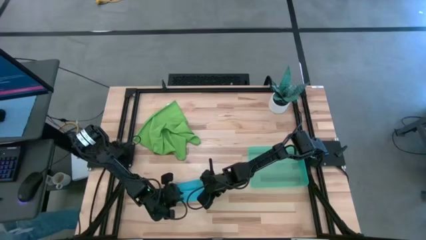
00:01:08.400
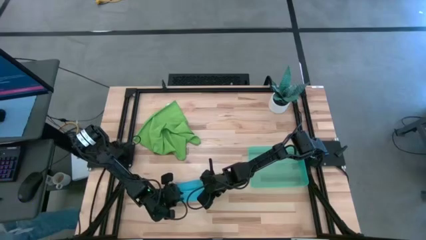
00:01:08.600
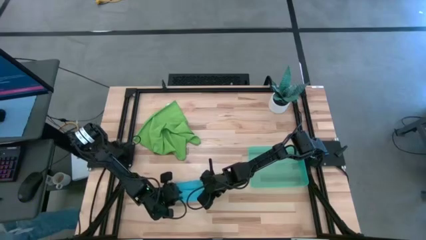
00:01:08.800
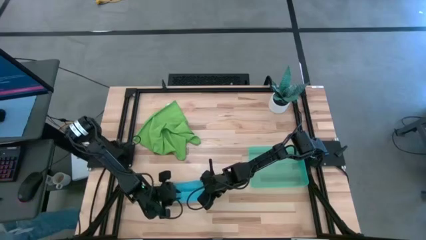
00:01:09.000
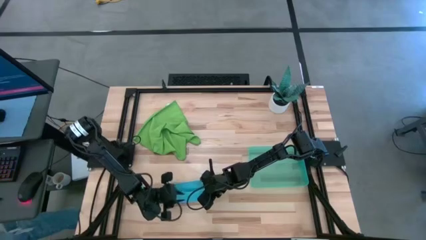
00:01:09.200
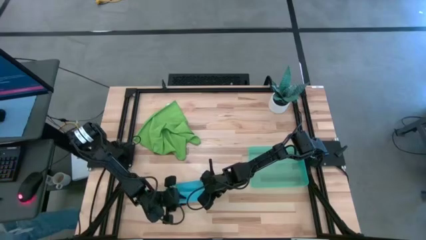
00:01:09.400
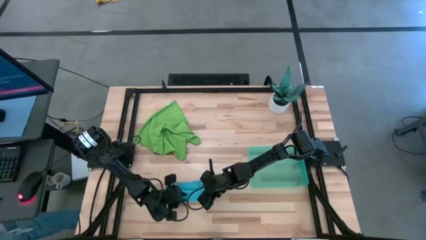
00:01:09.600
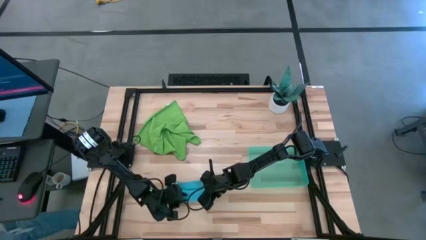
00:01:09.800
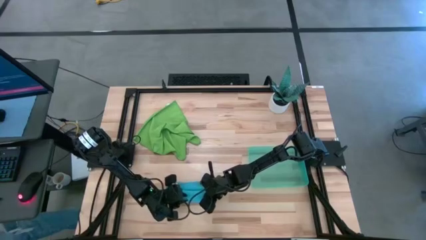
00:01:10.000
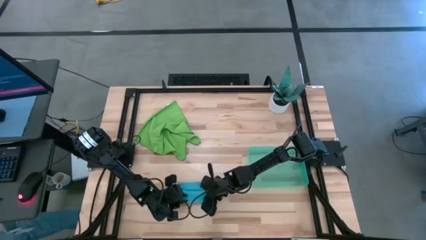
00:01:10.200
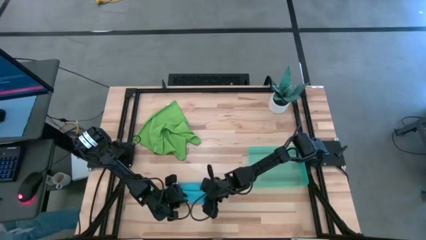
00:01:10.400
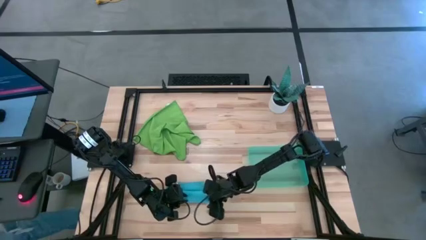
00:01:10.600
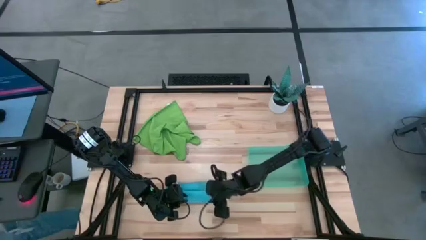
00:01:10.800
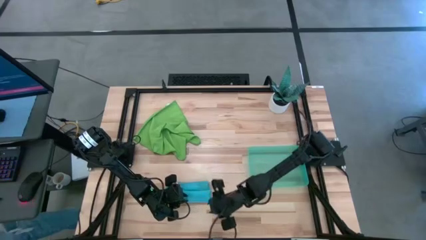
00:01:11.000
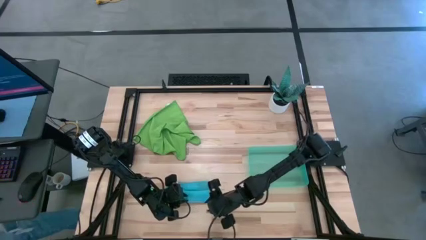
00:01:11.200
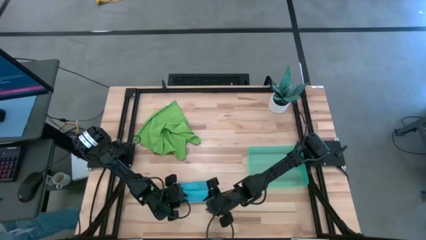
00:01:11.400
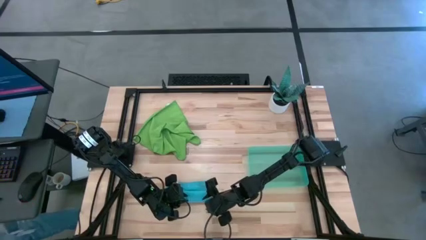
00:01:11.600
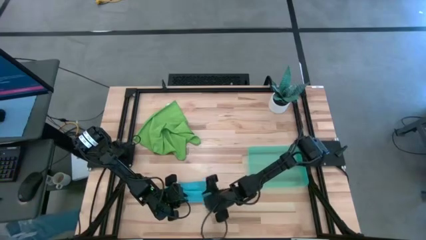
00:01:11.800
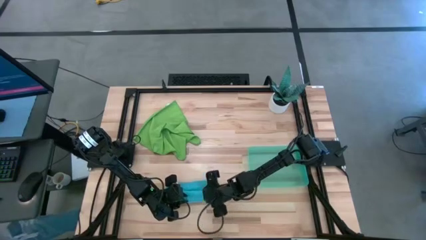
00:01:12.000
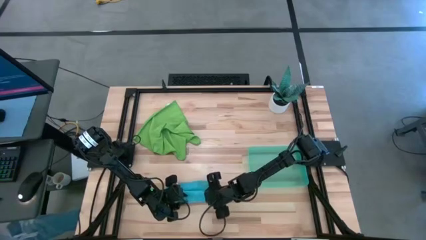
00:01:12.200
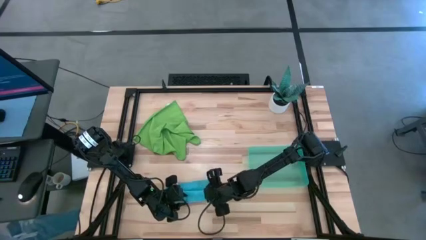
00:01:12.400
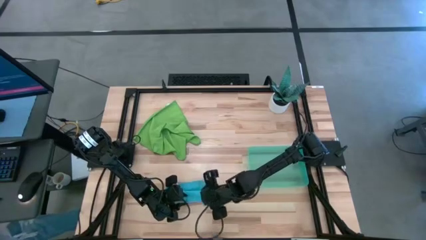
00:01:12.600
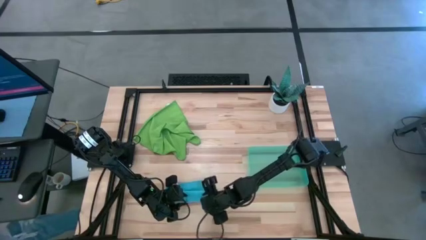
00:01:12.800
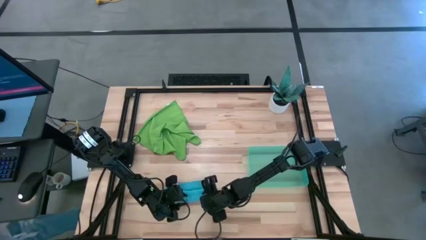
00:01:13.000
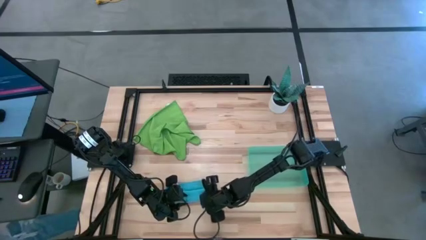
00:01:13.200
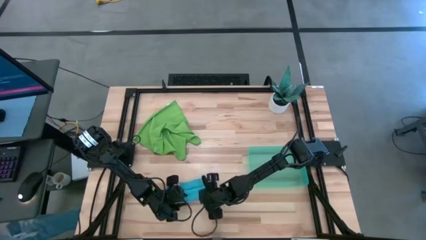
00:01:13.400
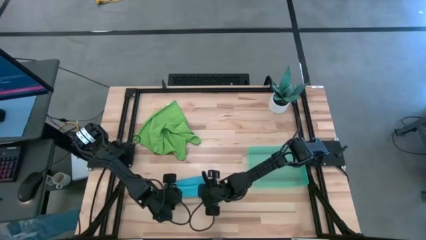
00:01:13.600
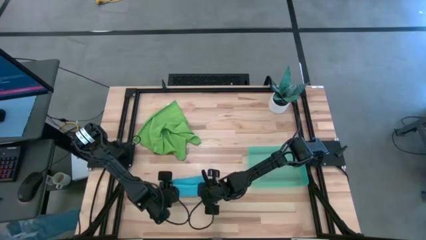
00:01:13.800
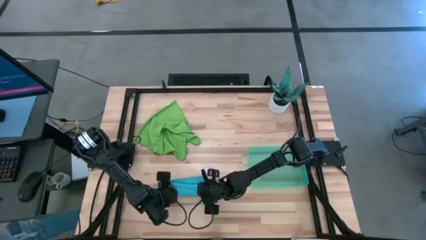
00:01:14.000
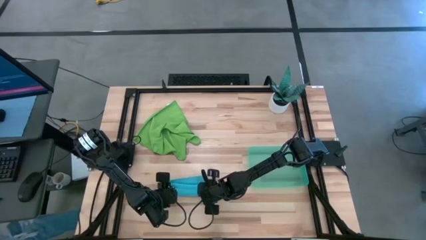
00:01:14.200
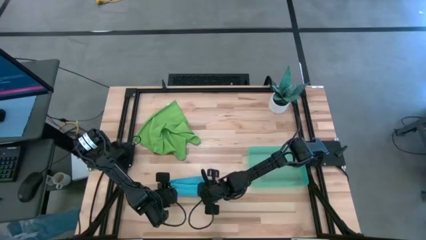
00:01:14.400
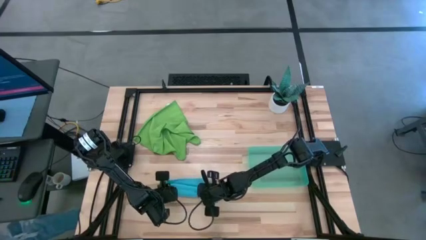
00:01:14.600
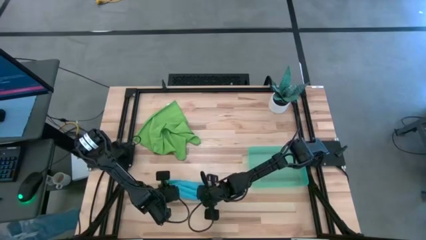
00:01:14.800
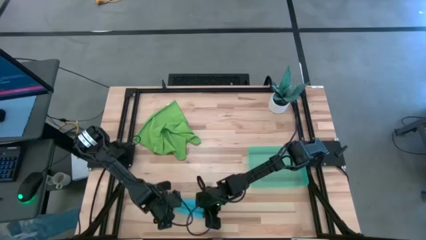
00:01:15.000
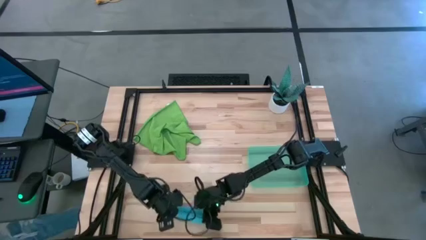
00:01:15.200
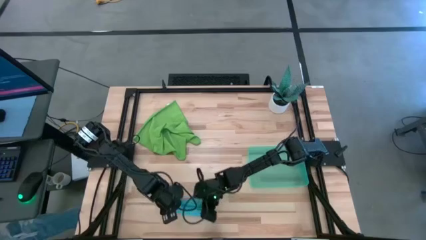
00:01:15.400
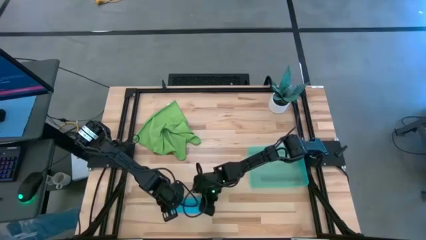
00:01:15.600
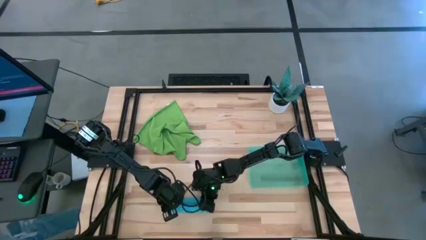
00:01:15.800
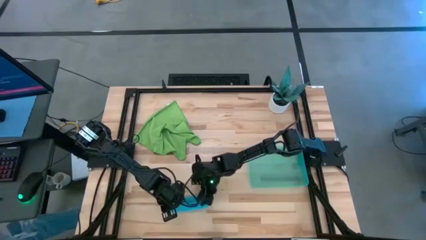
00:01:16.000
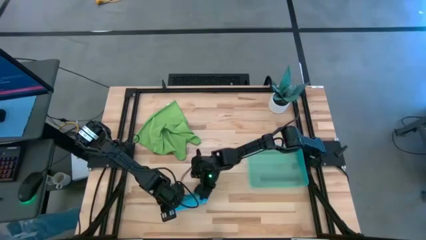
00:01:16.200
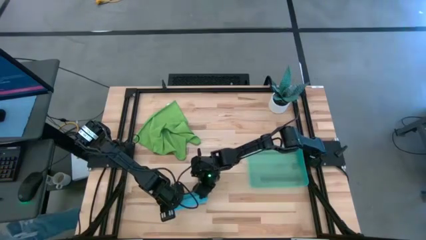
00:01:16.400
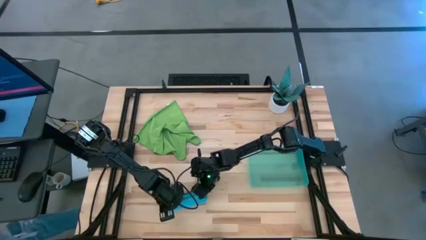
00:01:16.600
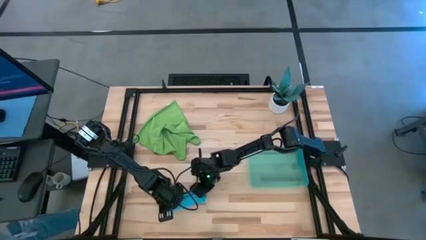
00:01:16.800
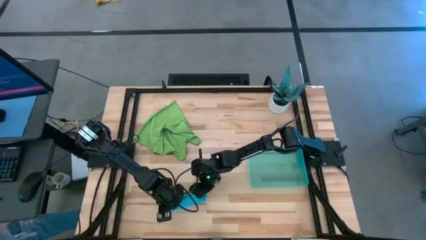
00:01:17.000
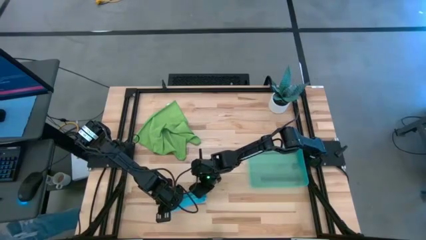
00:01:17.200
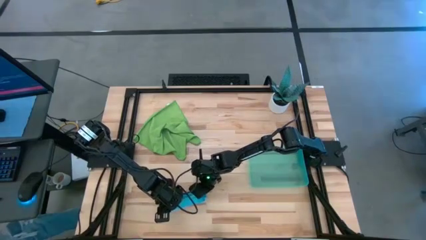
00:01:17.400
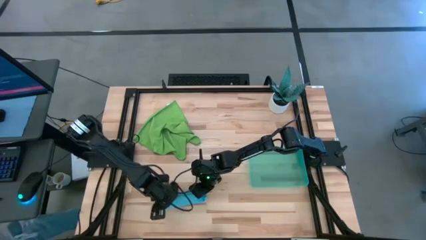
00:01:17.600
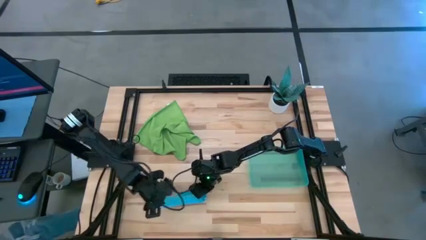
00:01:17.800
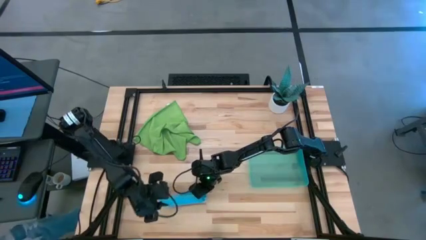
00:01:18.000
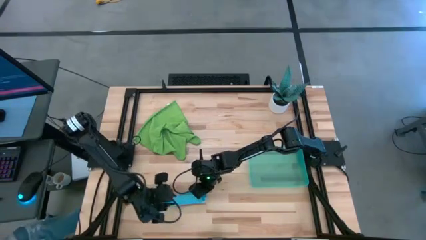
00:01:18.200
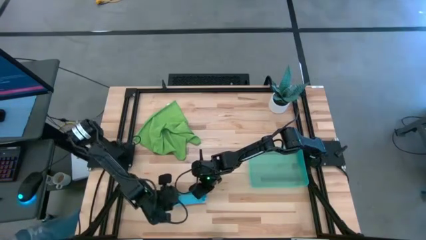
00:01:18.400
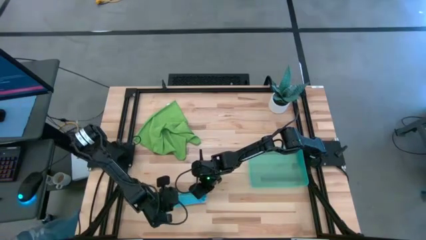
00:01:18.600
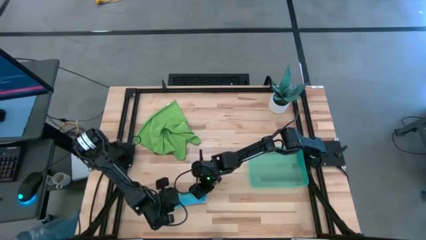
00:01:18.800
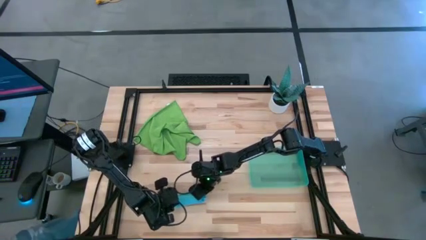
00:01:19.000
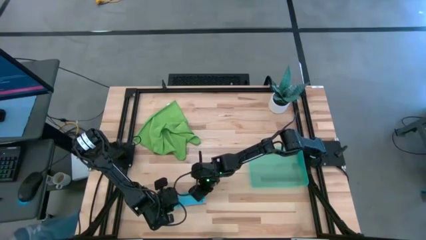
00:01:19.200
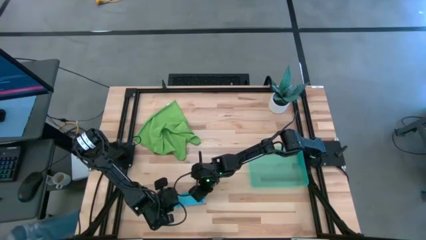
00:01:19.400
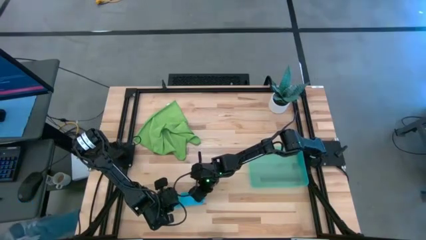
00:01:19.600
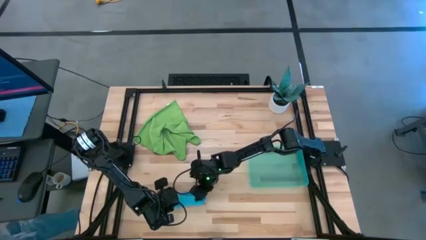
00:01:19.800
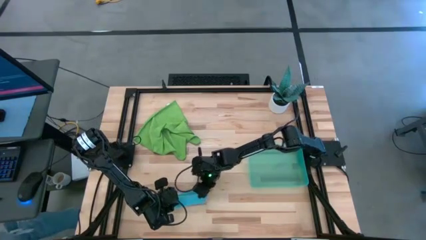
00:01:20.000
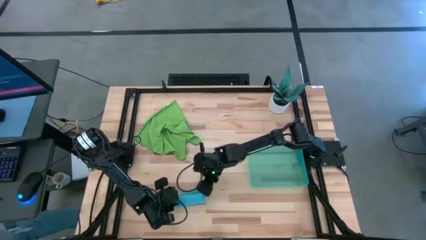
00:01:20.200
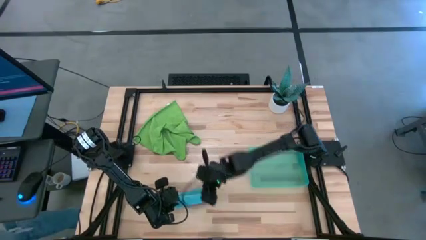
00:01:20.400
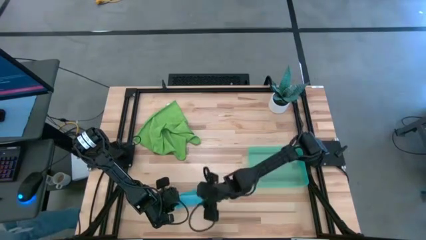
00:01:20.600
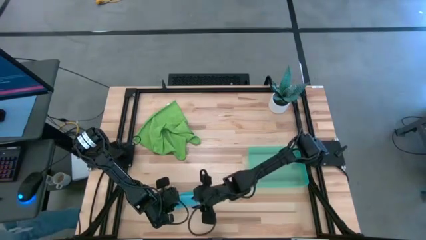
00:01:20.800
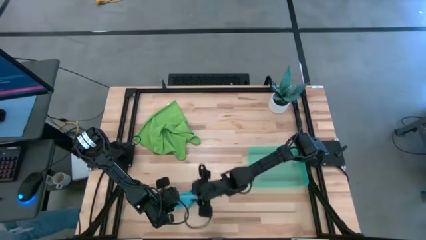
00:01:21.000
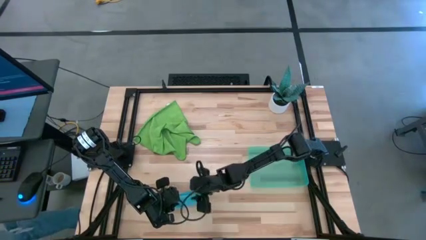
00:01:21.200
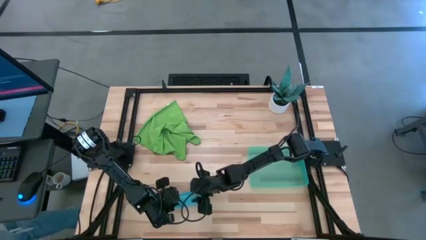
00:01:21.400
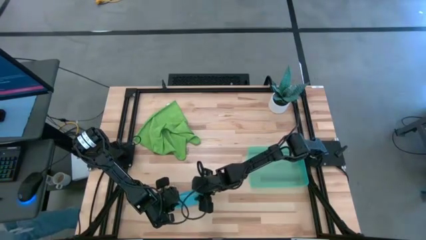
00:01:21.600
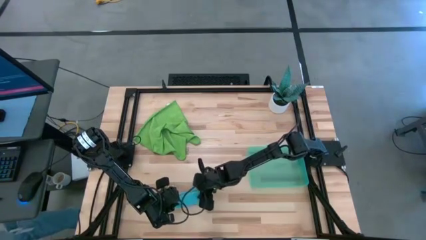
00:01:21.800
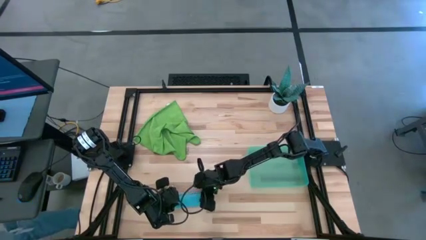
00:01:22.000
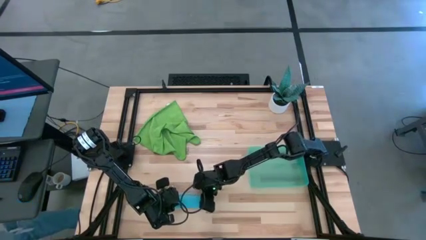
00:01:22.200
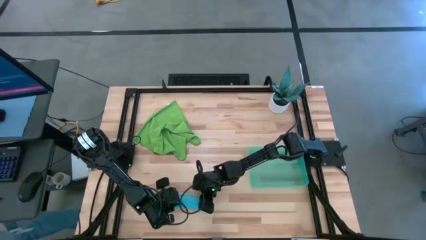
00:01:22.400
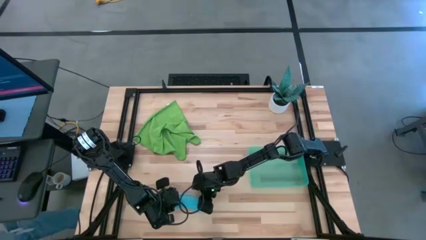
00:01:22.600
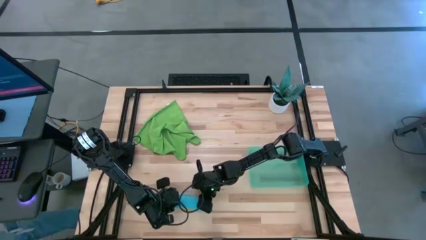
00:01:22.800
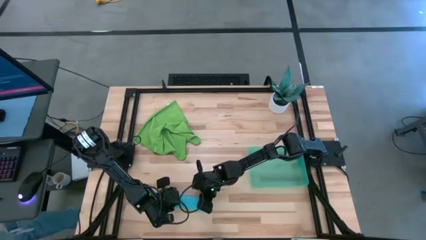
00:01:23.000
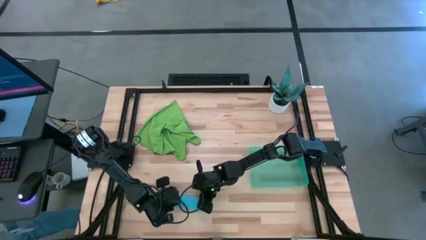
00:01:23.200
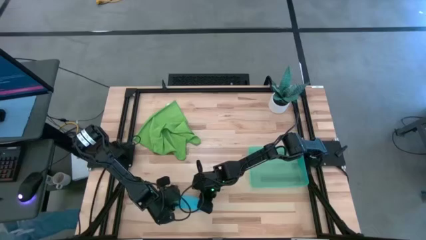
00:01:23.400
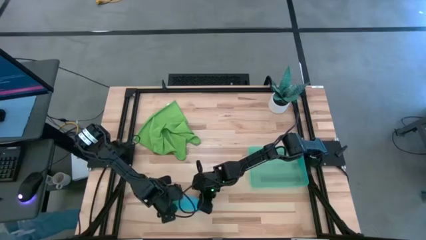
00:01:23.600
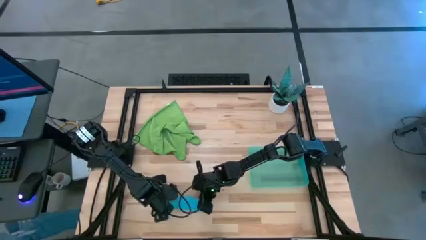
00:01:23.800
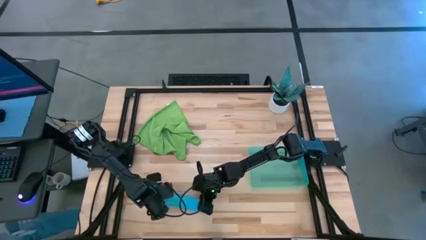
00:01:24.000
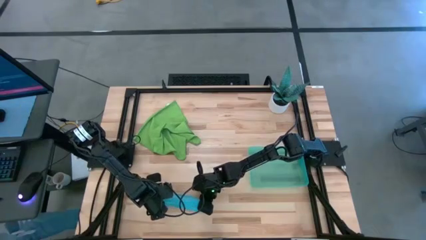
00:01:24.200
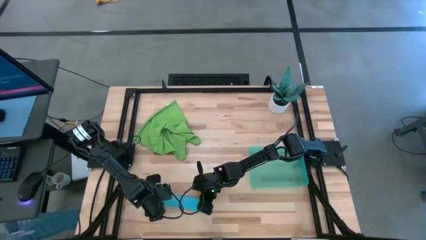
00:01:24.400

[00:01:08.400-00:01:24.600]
Task: Roll microfiber towels into tight, uniform cylinder then place into a basket
Roll the blue microfiber towel
